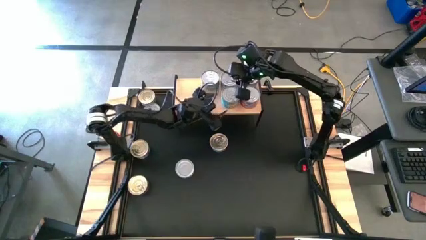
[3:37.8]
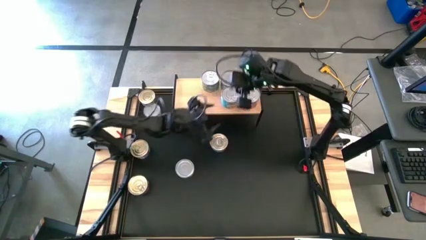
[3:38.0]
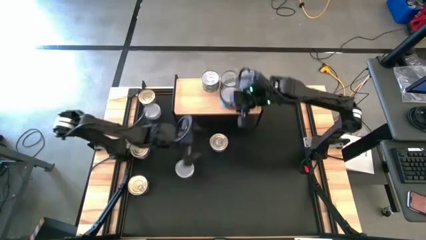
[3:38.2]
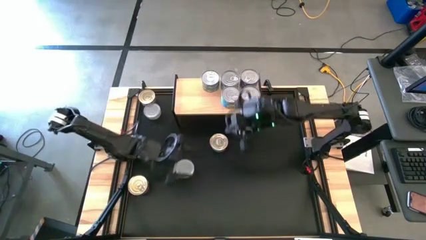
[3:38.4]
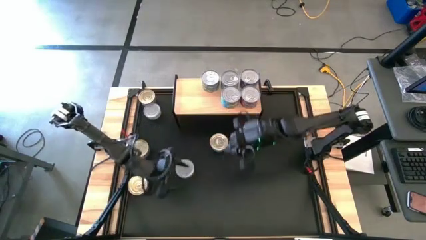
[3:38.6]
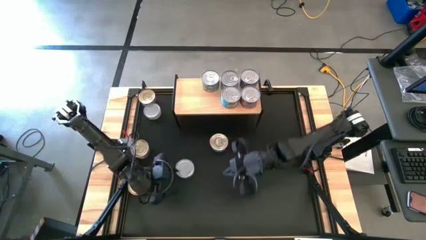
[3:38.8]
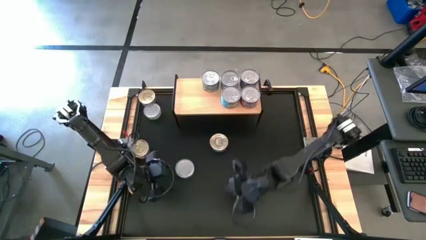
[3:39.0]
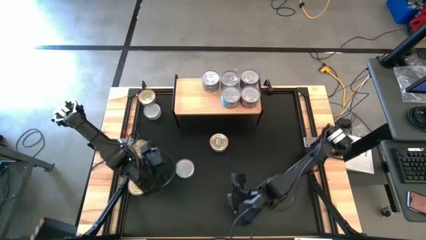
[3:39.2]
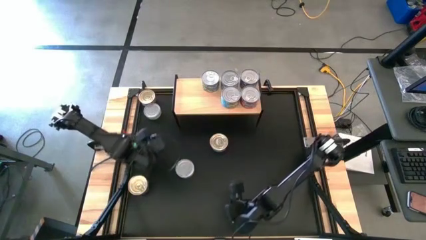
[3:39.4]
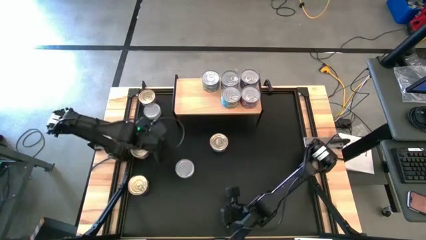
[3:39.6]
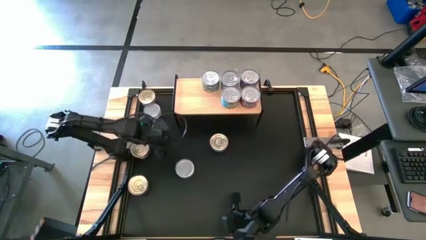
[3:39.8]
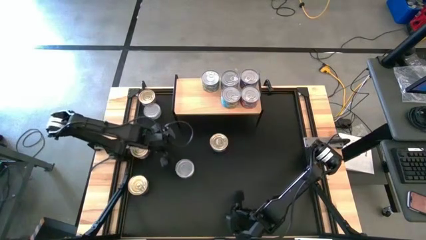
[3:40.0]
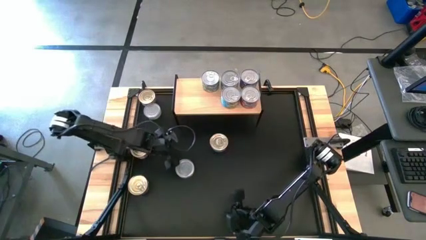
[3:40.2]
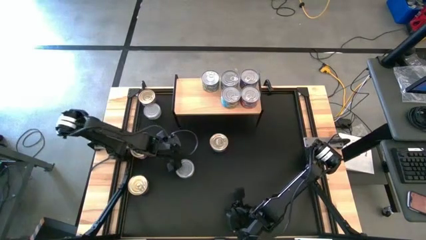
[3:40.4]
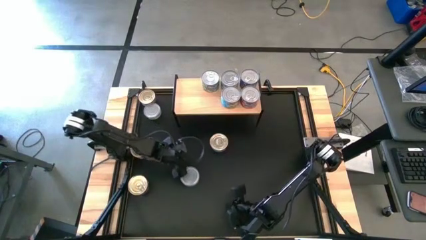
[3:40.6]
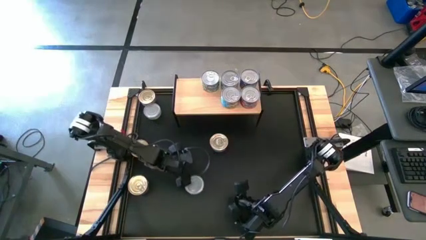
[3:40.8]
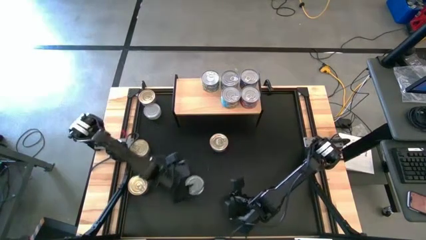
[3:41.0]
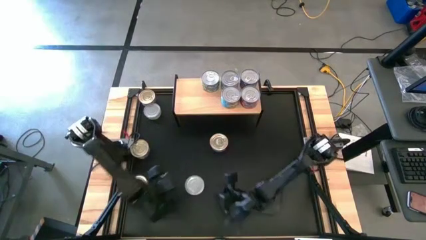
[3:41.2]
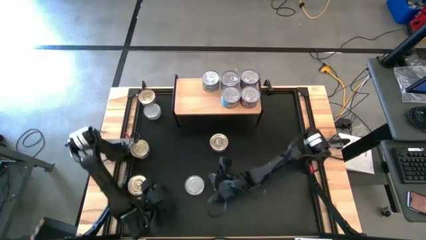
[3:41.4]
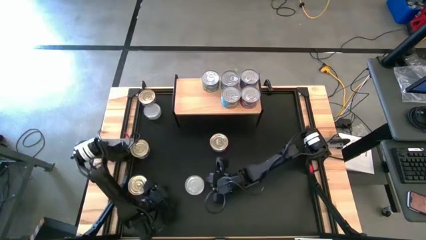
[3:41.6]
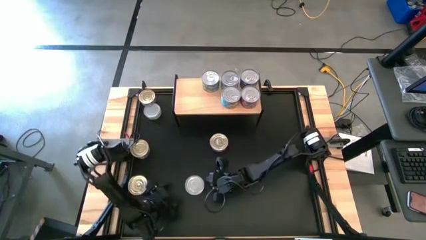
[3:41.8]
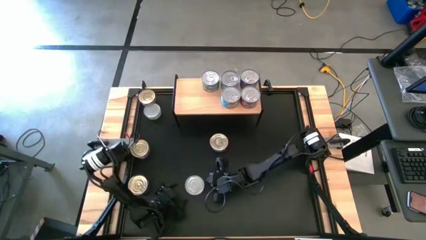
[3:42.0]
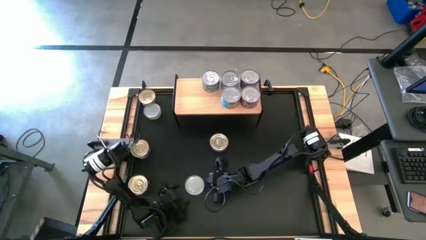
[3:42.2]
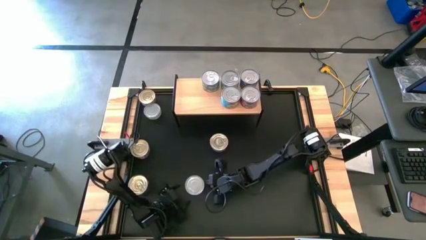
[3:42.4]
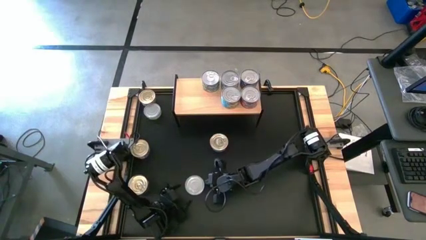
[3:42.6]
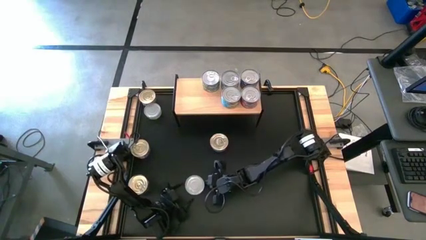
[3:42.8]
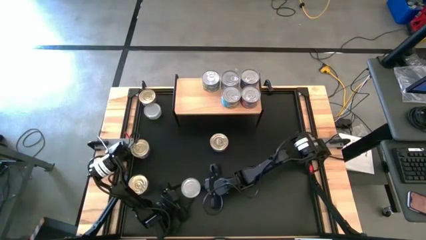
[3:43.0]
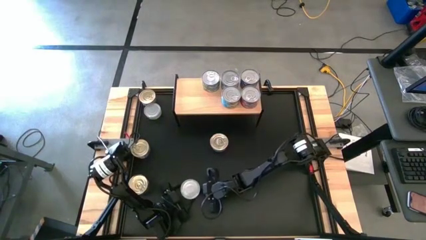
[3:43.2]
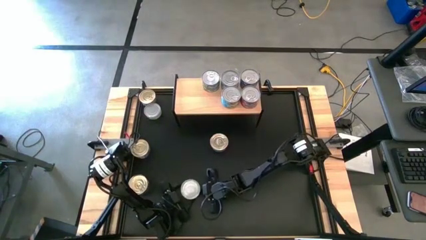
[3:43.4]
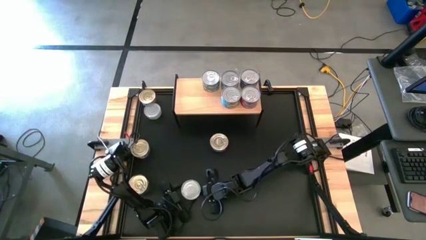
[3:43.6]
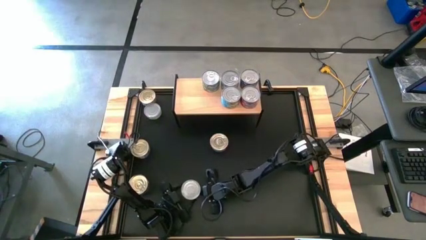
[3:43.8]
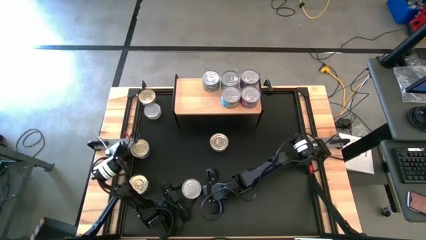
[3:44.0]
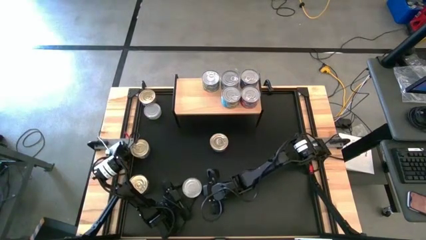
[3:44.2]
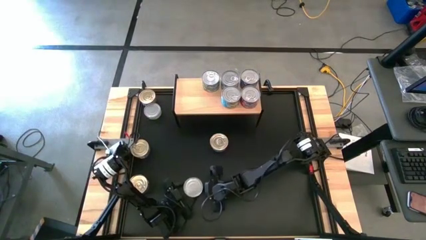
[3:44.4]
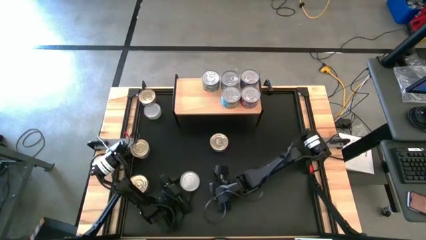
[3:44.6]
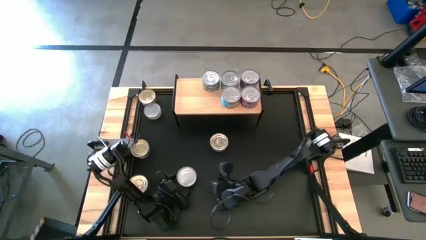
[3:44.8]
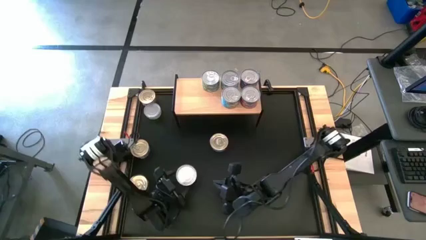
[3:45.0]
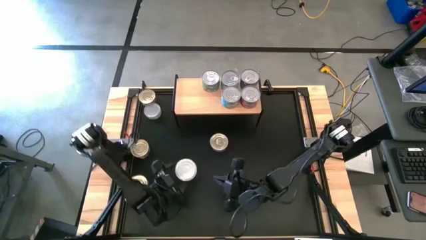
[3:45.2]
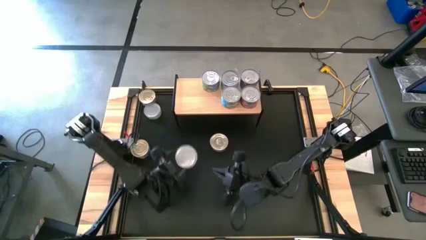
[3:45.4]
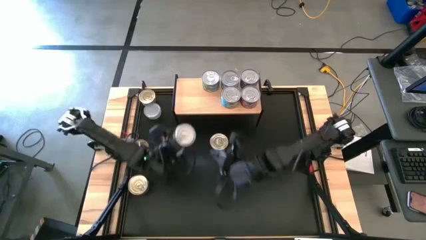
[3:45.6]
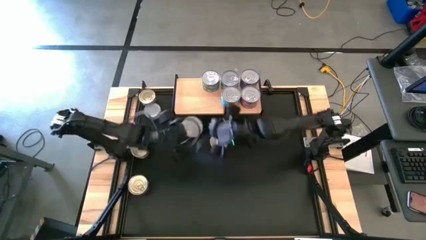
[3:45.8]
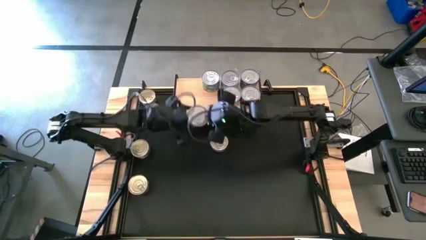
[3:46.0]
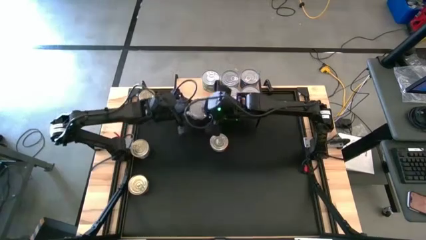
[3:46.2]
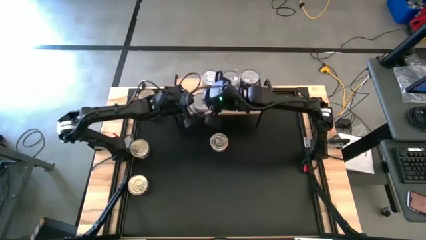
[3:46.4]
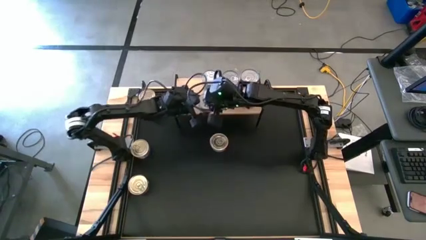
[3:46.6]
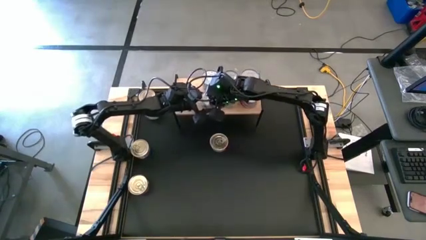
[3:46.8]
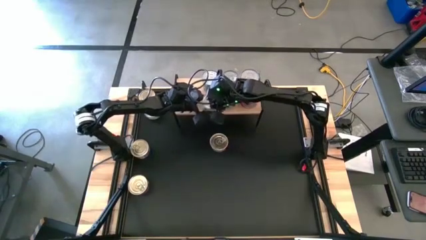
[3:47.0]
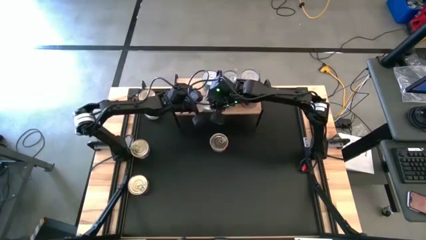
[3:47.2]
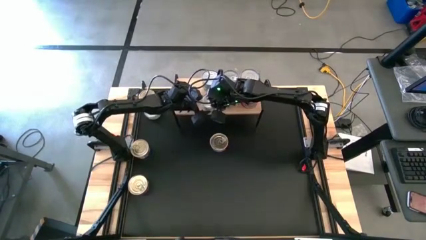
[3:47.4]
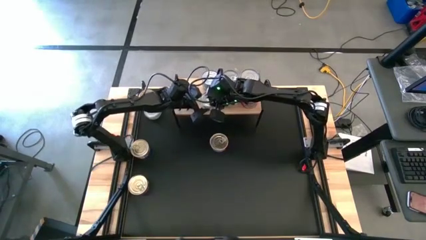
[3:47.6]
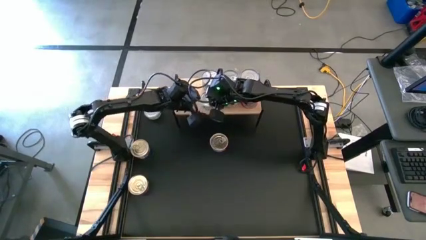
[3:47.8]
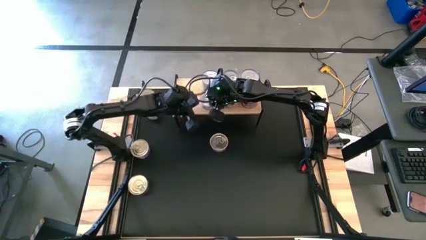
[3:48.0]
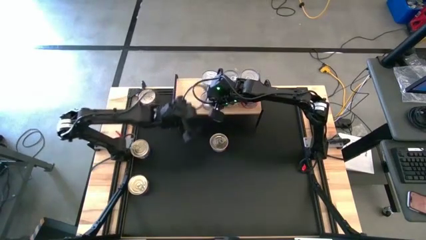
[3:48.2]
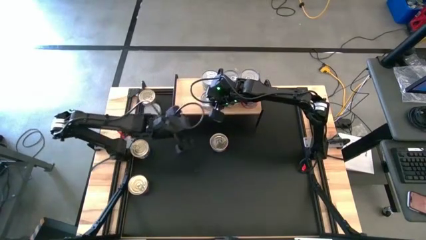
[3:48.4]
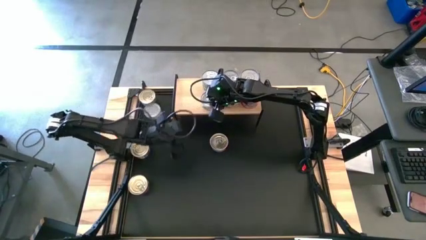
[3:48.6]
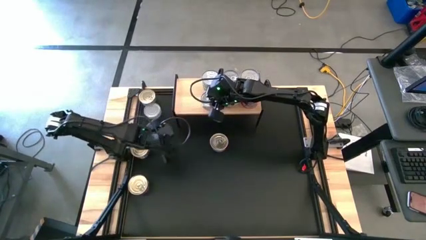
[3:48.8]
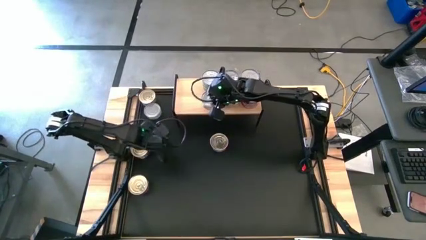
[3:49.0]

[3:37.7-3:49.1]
Task: Stack canned seafood by type on shelf
Put the green white tuna can on the shelf
